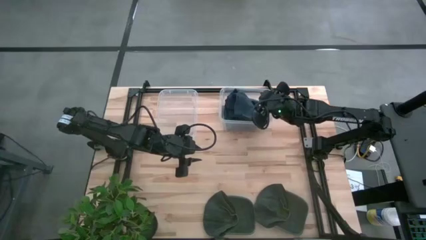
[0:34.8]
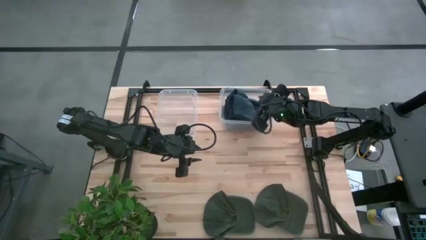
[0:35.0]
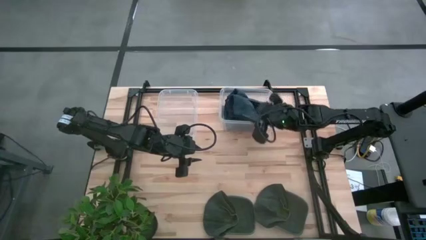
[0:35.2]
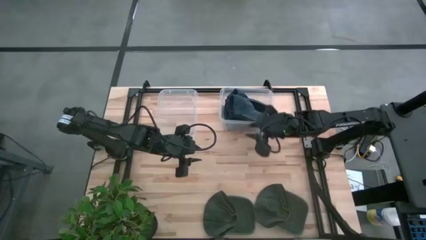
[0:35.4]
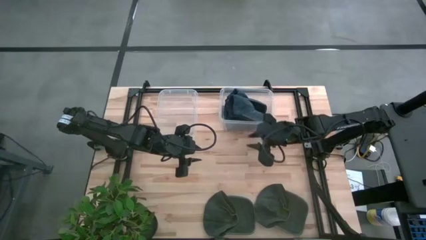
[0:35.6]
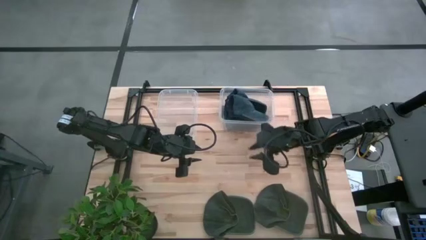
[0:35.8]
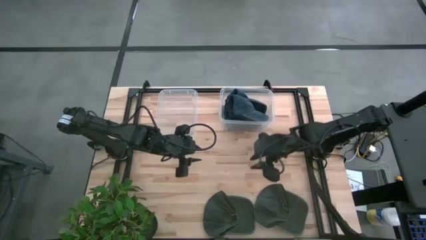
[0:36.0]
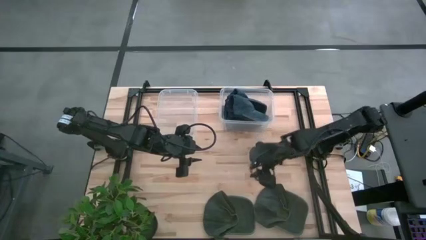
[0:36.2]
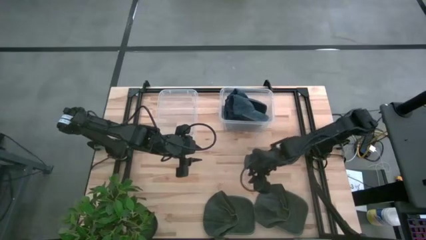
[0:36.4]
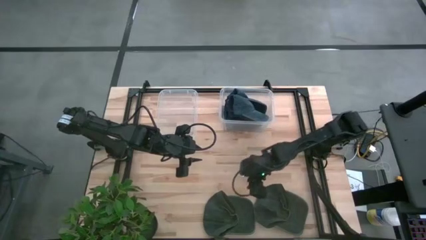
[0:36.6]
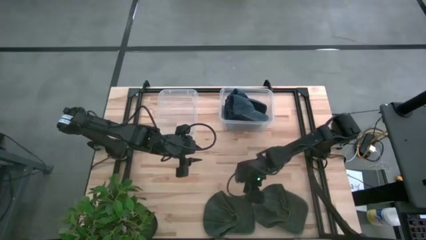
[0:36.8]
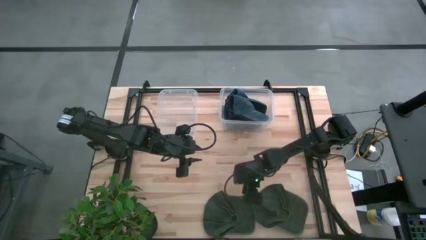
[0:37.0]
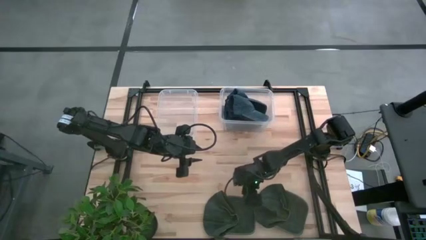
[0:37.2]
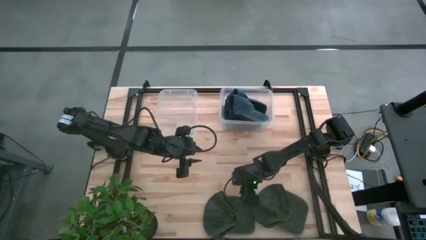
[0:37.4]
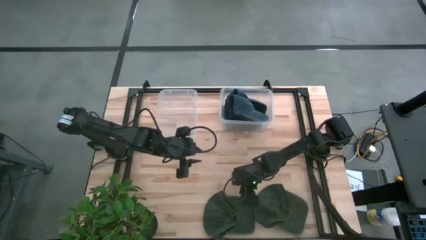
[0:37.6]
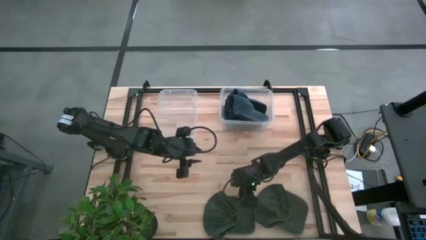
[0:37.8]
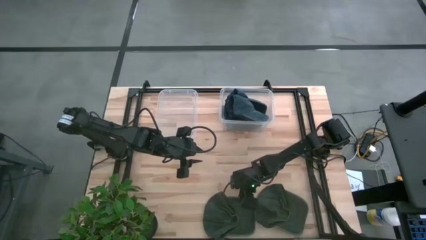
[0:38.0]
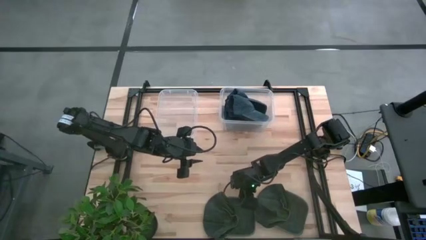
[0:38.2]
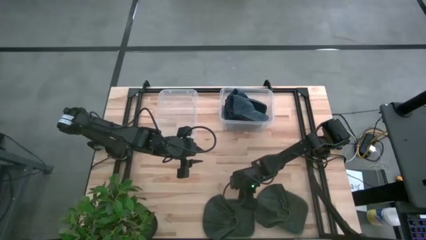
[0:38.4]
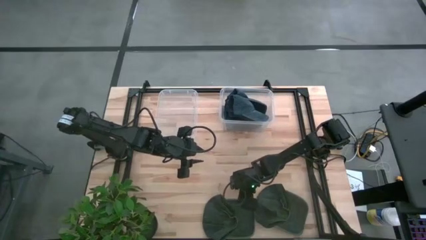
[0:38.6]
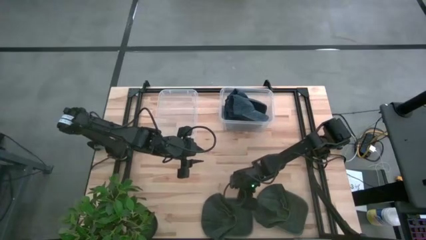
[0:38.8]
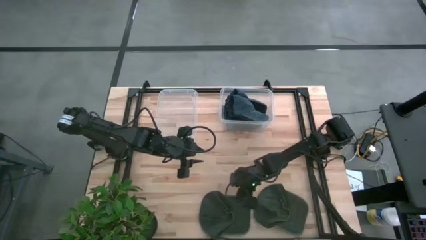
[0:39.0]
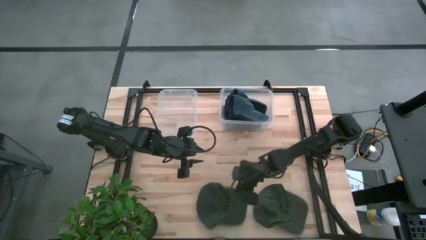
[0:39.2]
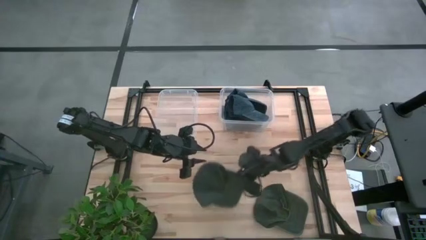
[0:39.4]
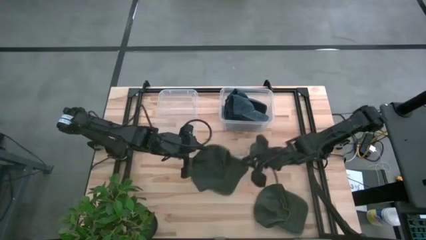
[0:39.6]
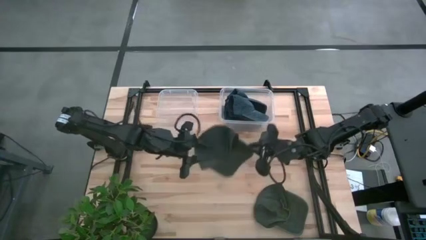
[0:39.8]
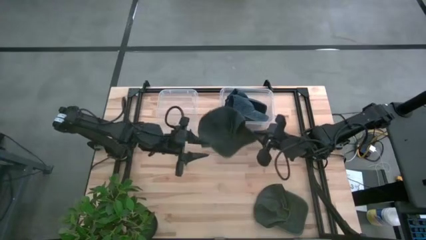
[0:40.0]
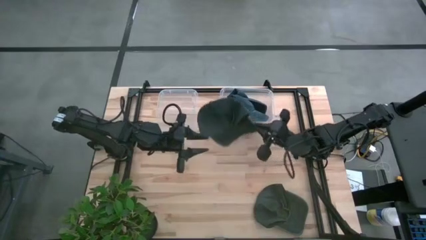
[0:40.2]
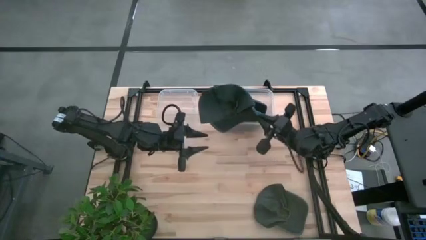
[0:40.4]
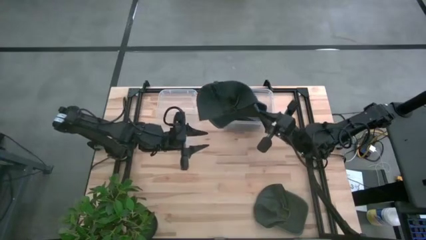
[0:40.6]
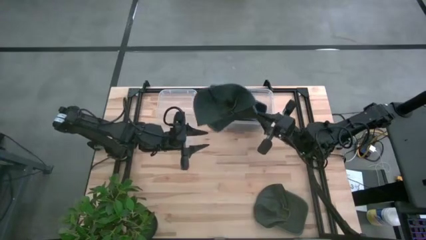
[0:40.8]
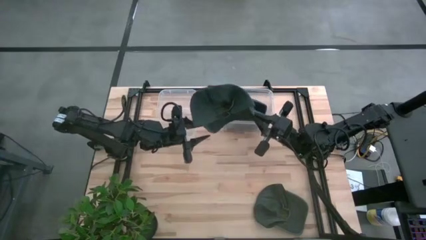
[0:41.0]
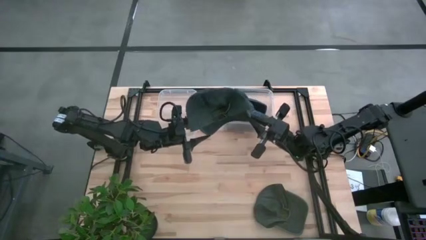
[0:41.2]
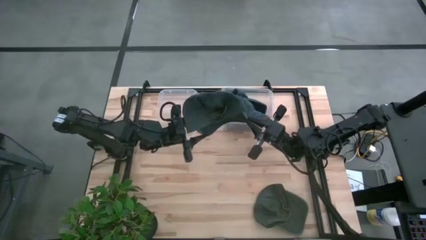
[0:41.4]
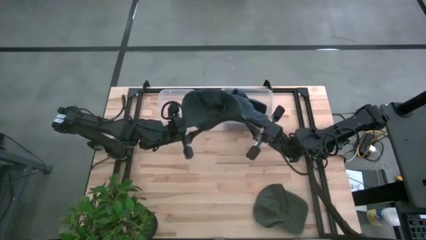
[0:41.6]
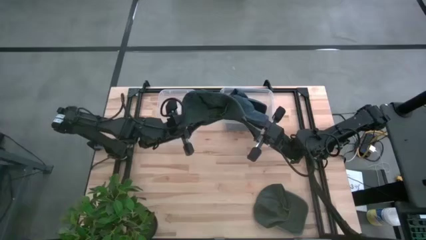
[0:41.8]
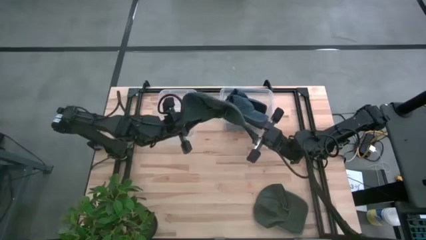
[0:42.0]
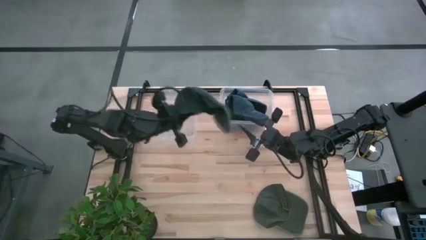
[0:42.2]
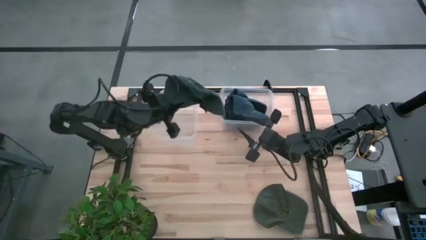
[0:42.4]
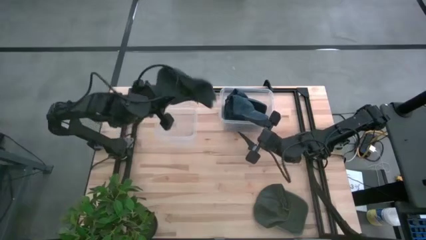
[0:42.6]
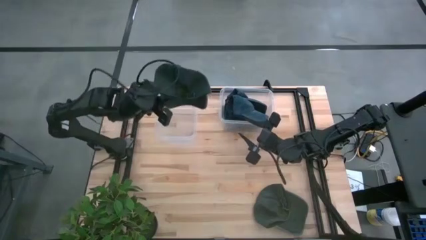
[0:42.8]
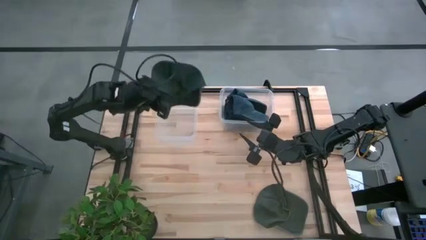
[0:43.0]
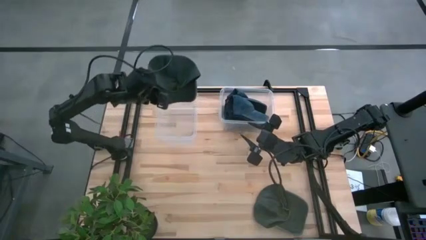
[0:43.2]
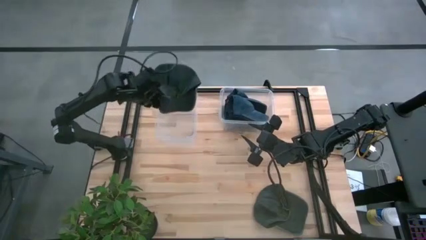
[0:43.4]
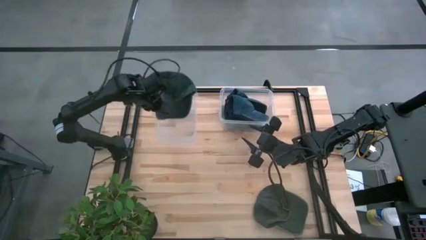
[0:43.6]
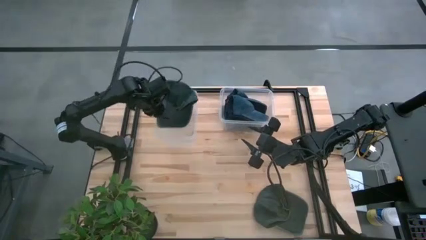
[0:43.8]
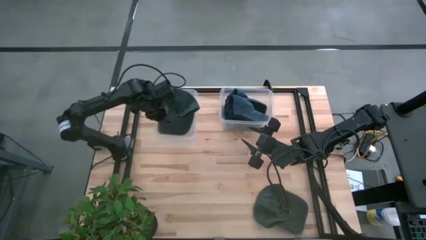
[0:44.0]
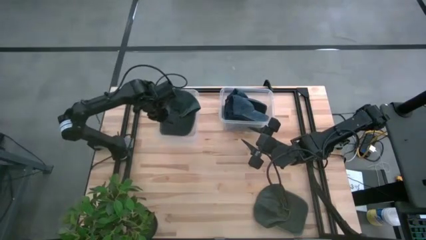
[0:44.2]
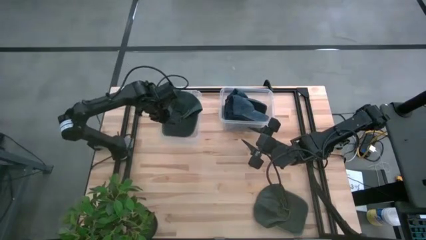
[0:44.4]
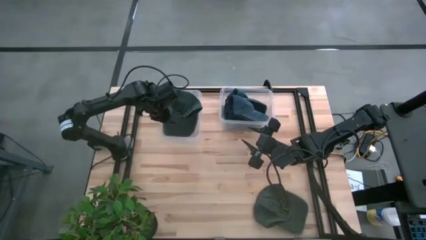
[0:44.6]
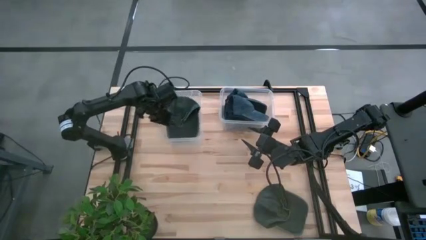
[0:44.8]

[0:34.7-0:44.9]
Task: Pick & Place hat
Put the left green cap into the left transparent bin
